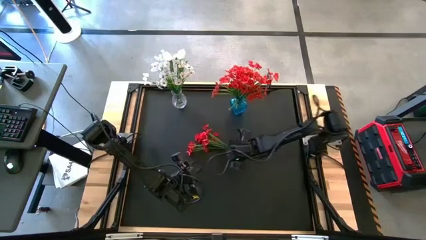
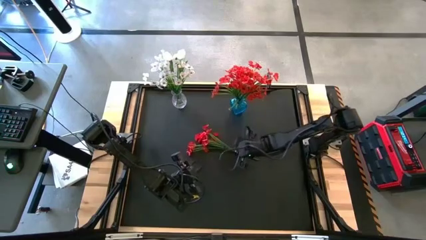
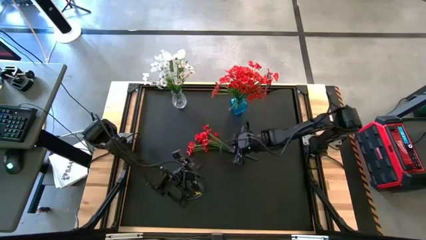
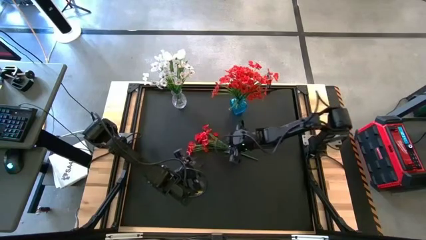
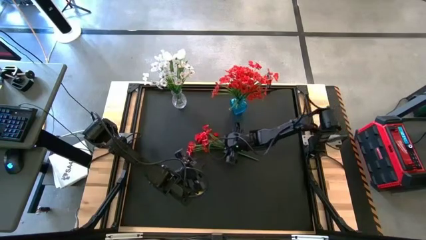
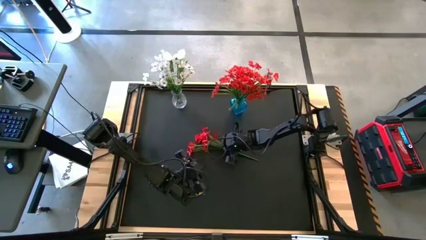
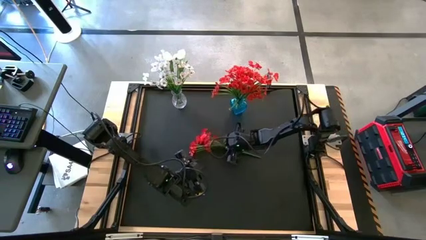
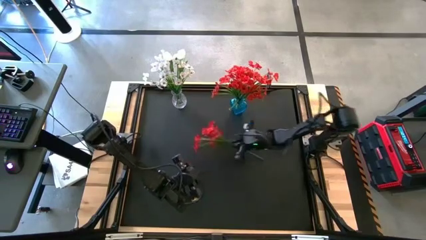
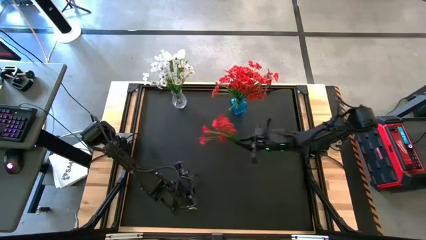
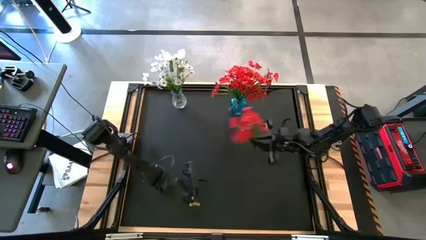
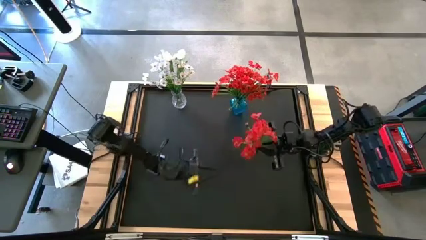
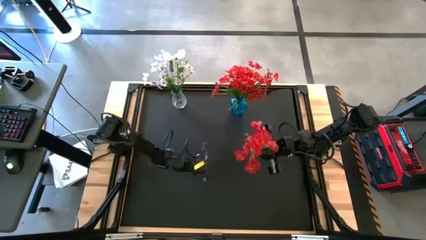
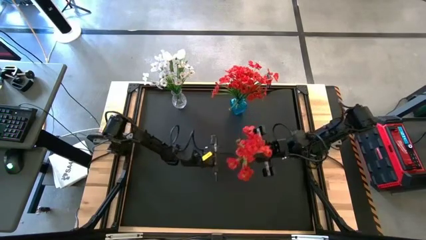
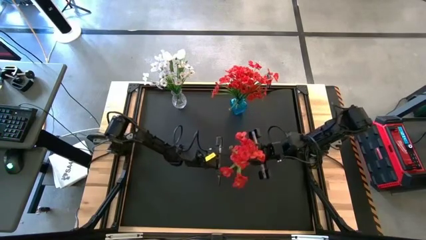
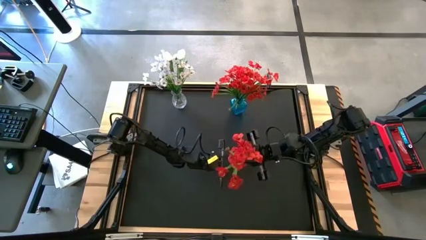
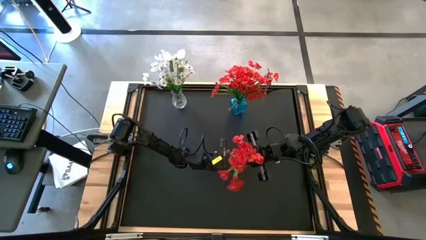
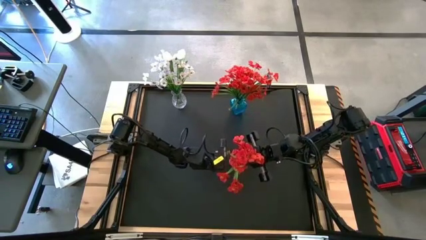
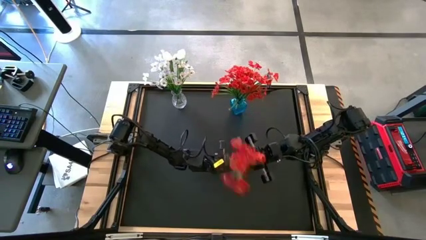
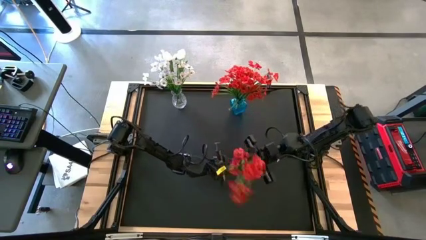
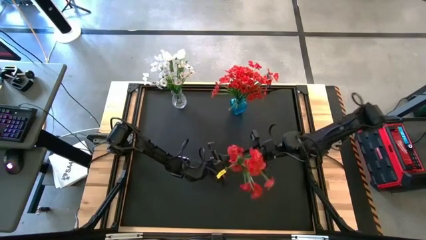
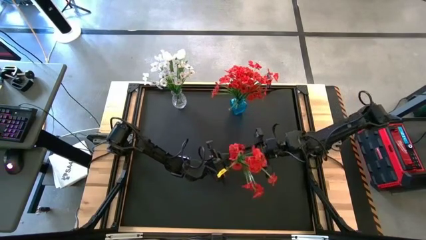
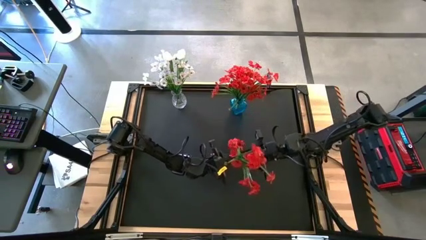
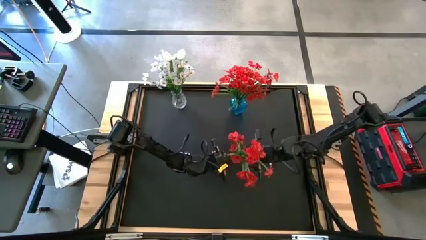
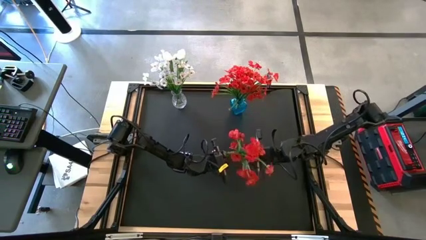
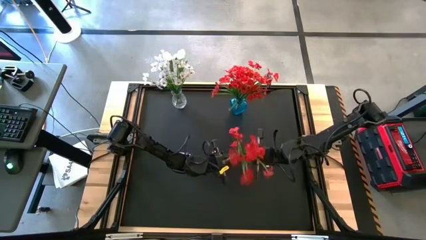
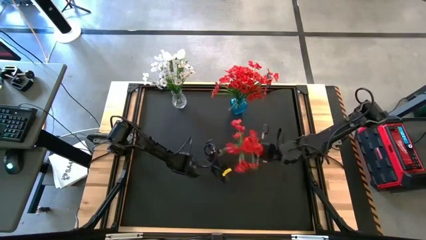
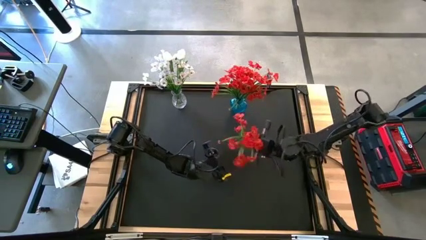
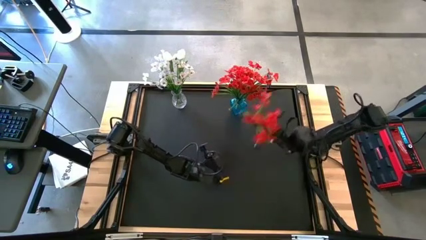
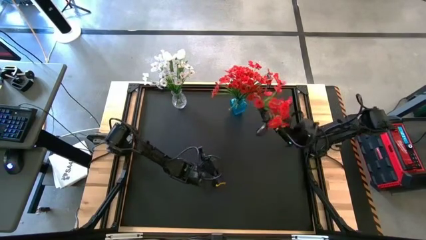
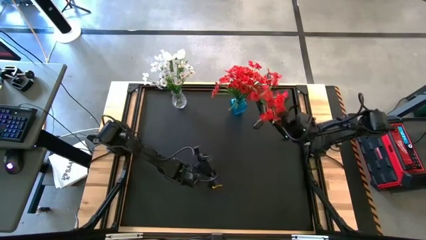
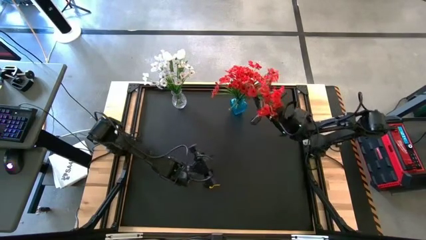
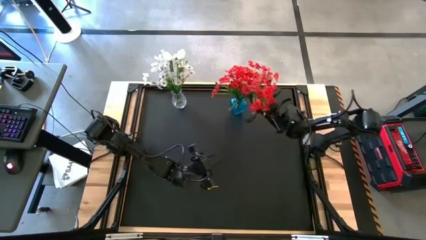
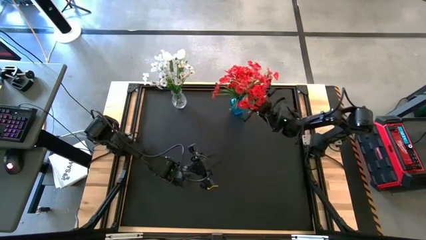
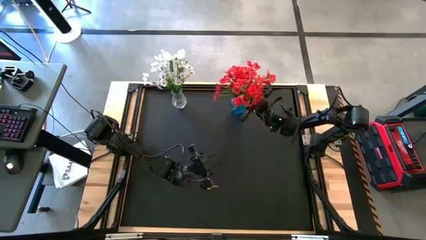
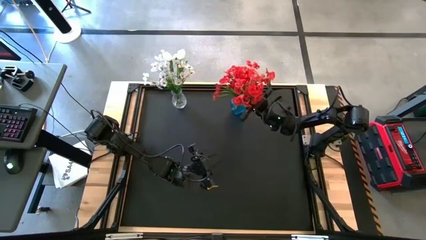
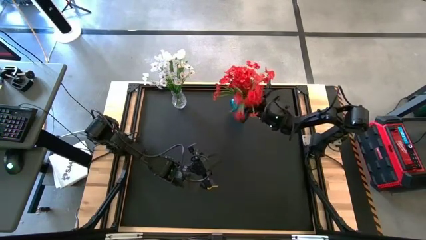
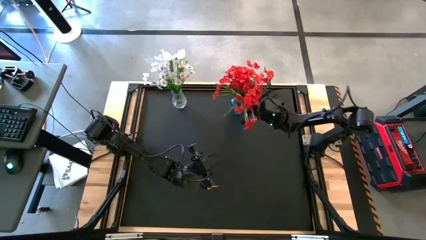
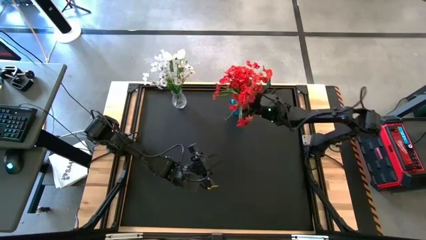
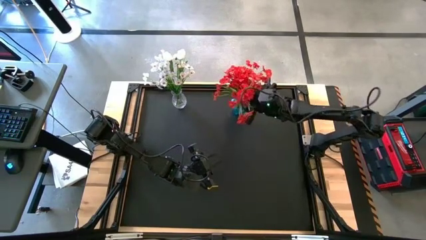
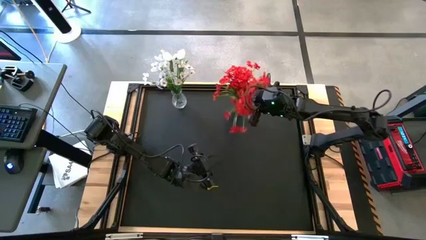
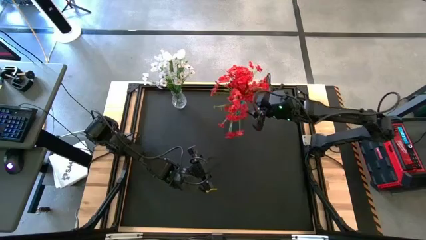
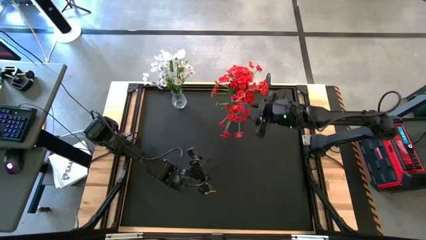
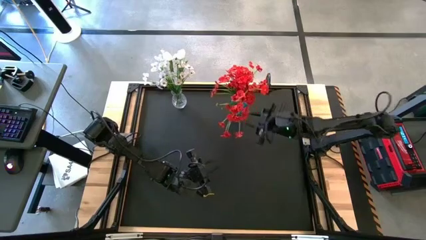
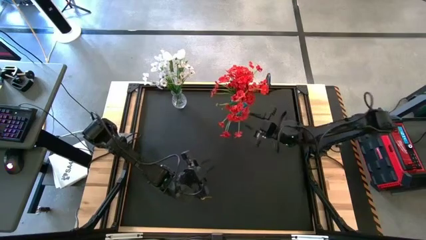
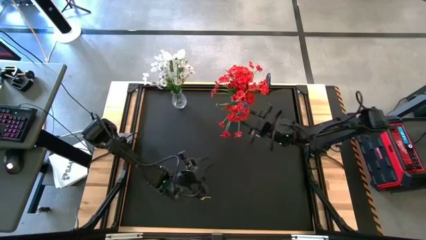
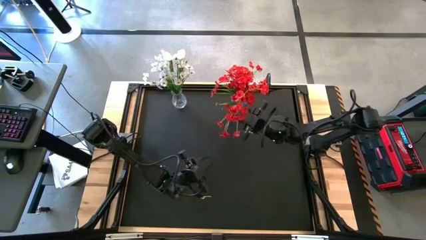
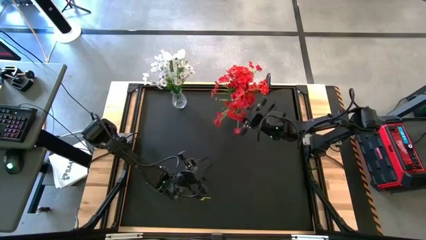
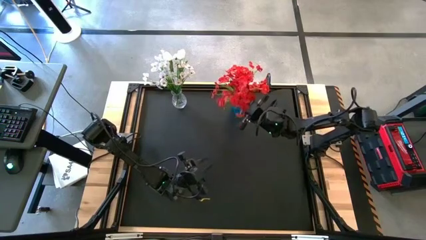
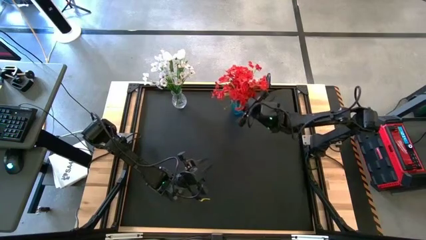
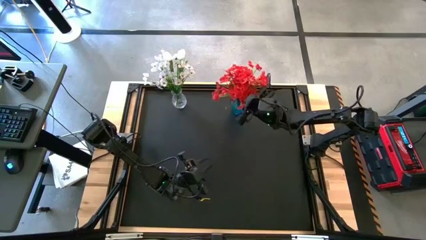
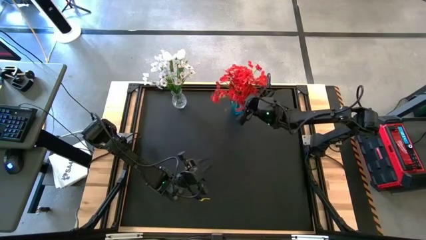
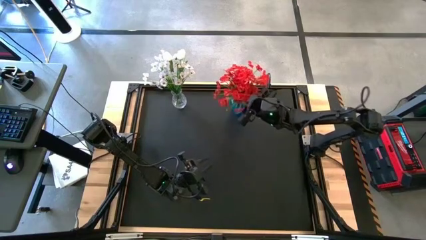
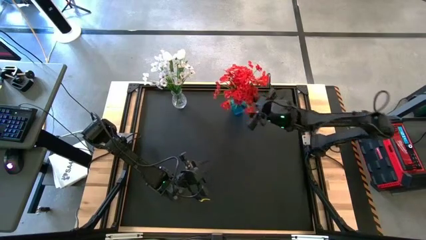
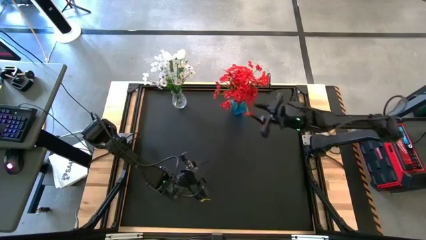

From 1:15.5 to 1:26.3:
Task: Sort flowers into vase by color
Put the red flowers into the blue vase
